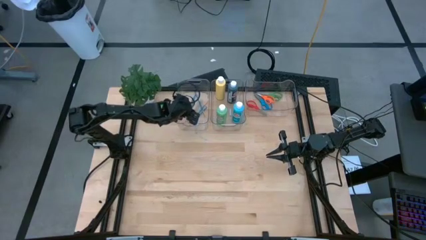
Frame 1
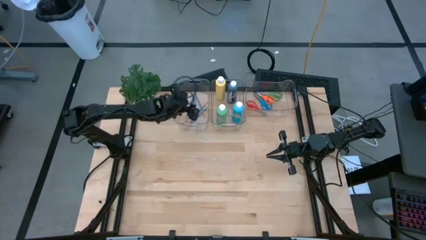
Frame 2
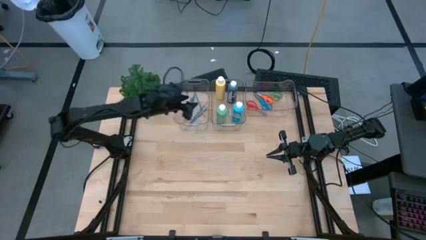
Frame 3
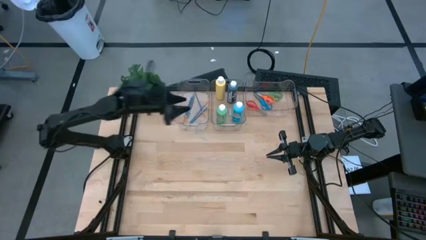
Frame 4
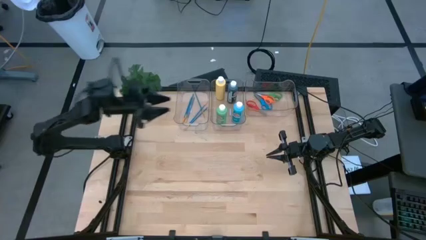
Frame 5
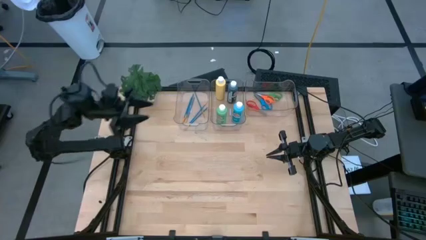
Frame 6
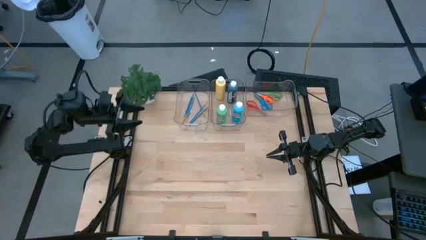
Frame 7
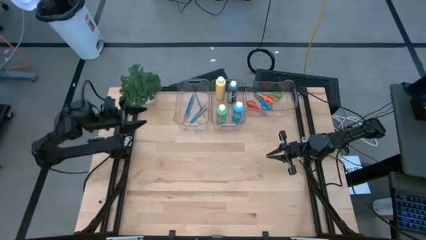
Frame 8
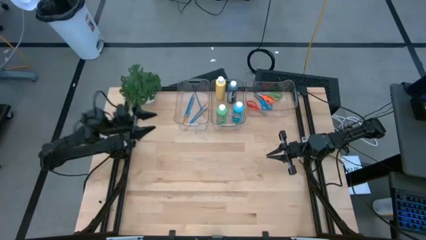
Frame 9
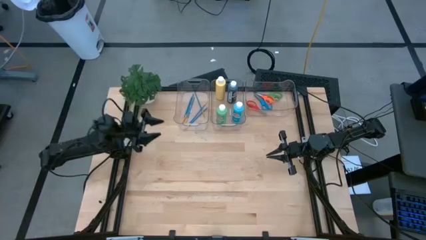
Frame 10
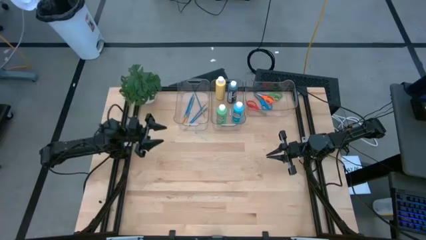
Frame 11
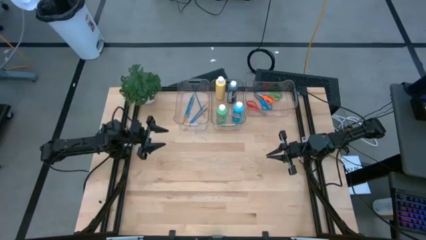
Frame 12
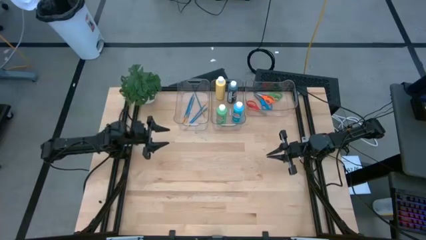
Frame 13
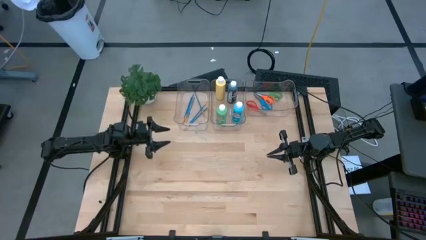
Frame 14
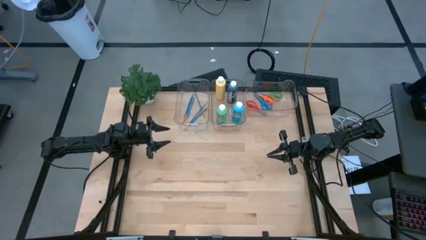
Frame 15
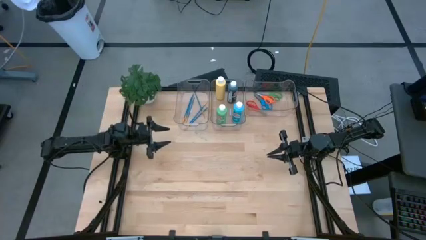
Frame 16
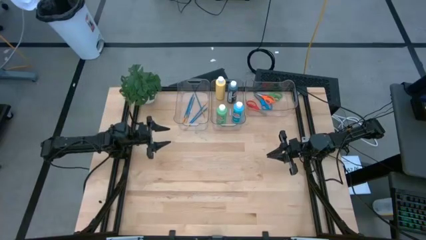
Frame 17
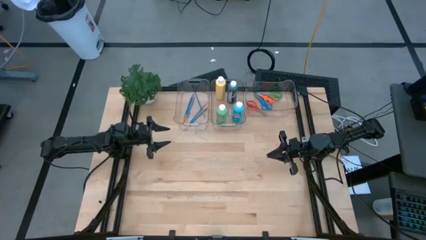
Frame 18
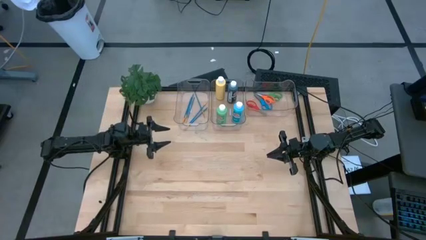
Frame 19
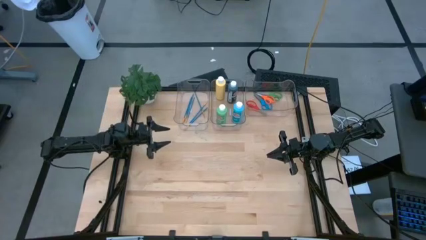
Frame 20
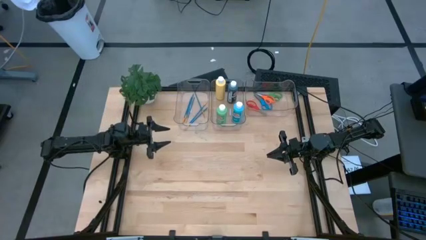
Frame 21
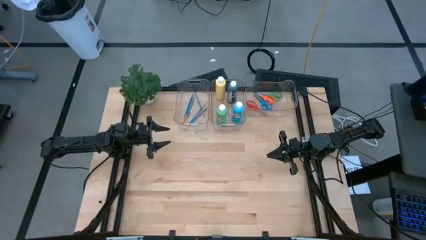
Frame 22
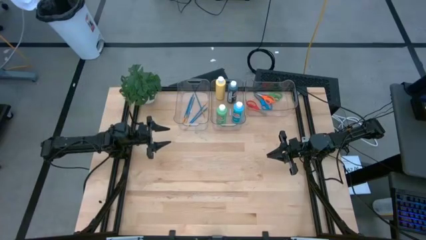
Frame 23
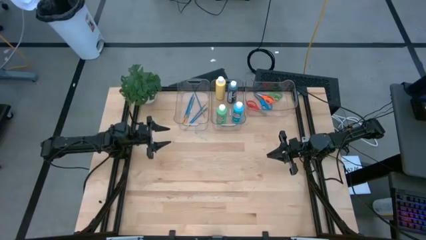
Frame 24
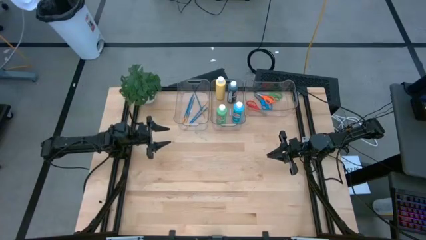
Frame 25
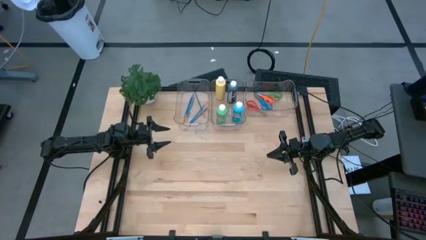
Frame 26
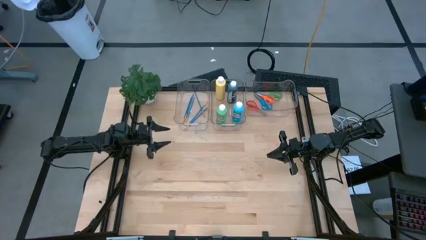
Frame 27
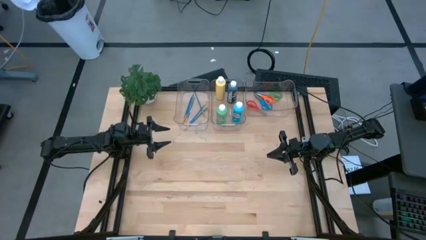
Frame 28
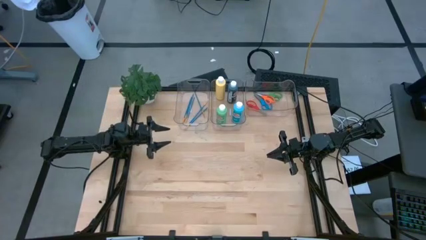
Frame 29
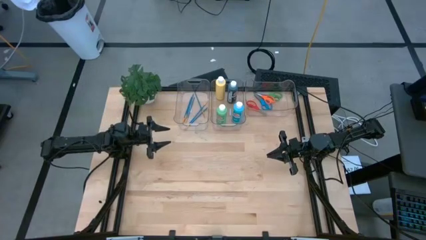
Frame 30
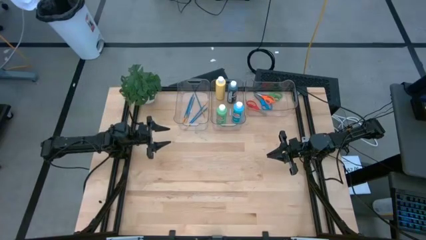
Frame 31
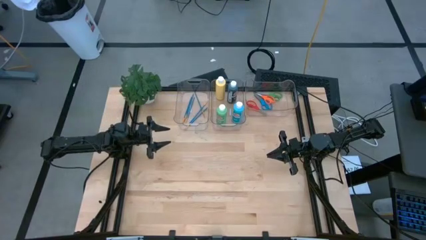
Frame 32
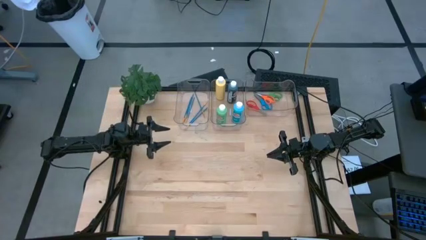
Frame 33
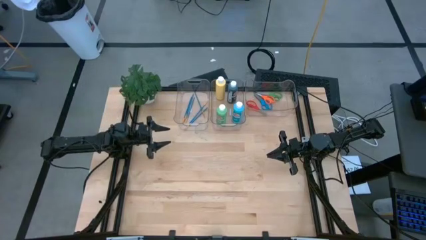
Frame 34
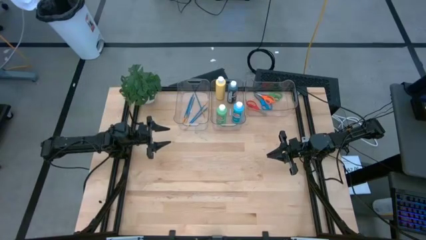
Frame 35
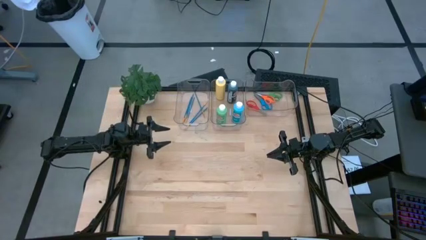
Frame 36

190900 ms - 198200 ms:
Task: Pick & Place Paint Supplies
Return to Home Position

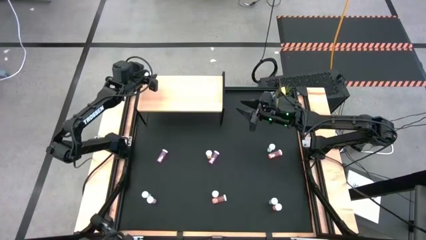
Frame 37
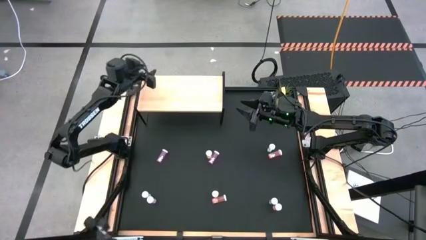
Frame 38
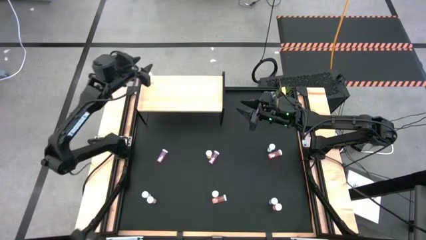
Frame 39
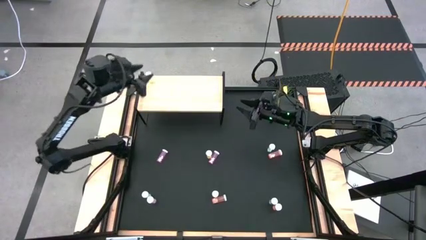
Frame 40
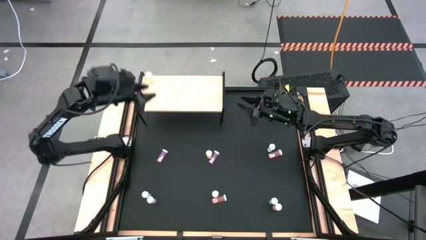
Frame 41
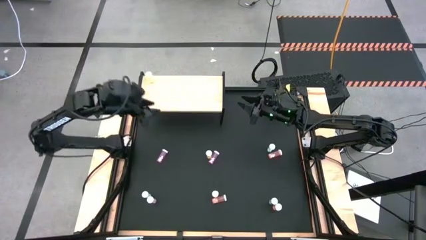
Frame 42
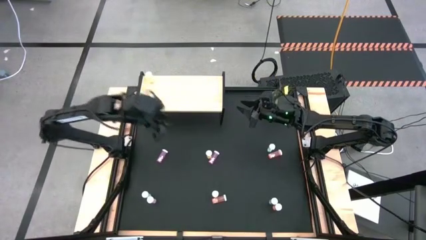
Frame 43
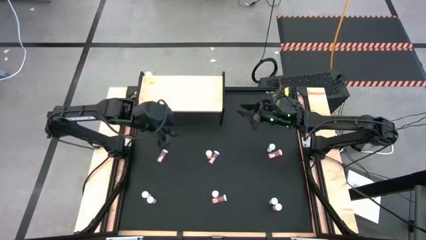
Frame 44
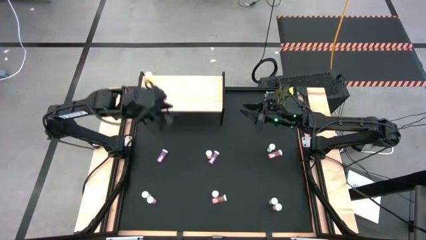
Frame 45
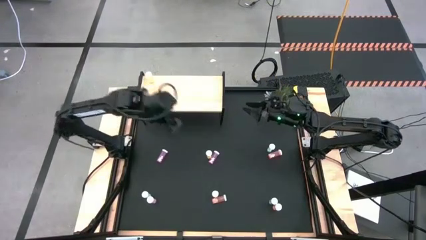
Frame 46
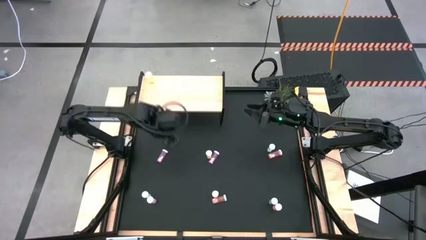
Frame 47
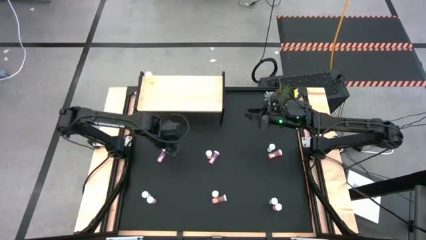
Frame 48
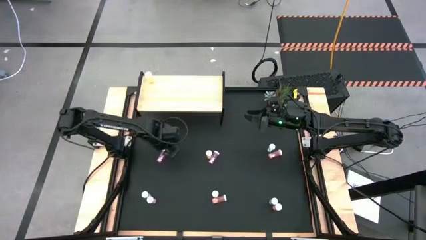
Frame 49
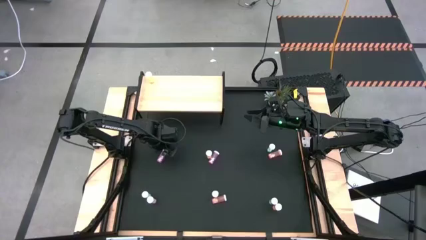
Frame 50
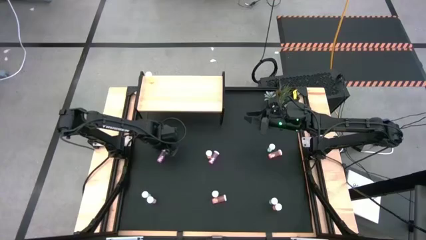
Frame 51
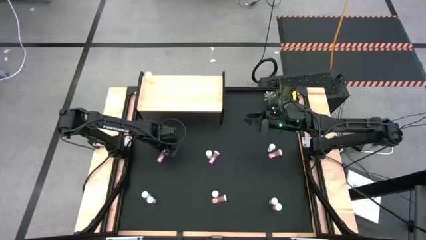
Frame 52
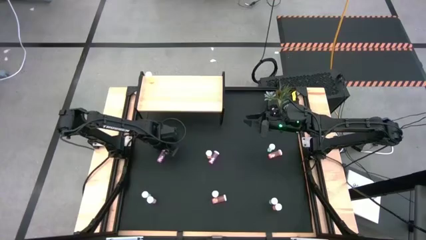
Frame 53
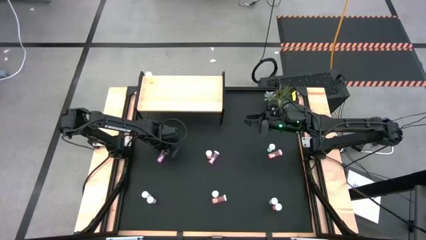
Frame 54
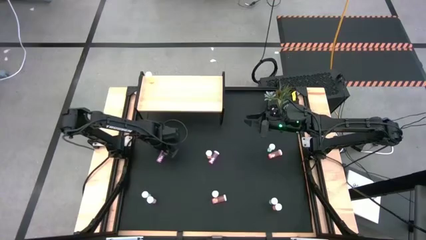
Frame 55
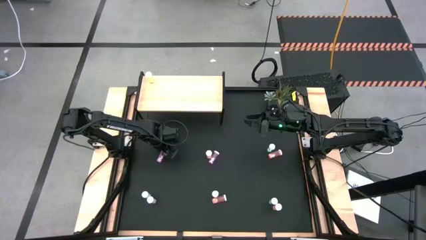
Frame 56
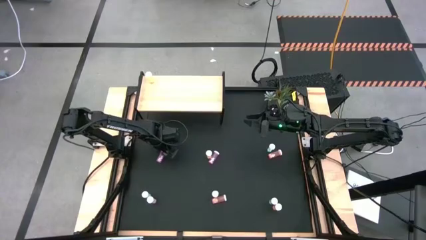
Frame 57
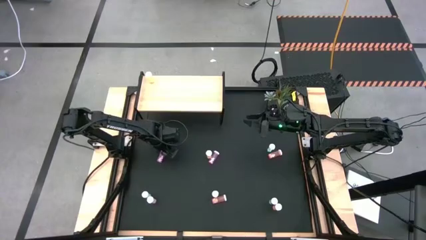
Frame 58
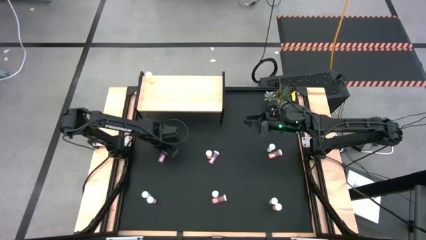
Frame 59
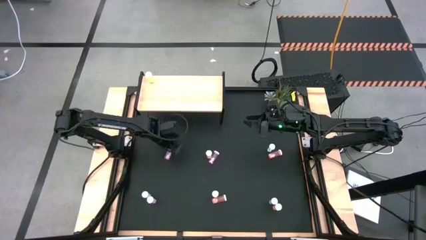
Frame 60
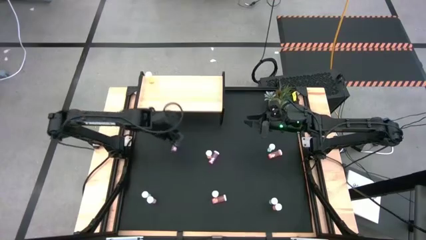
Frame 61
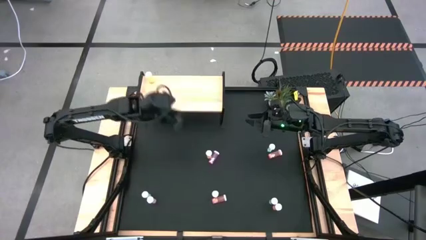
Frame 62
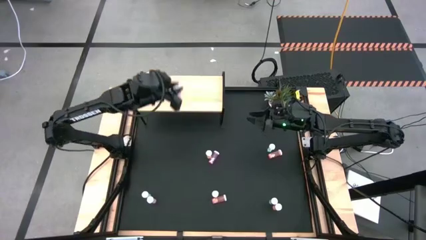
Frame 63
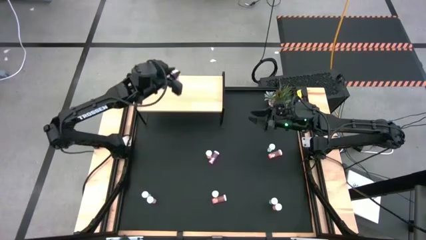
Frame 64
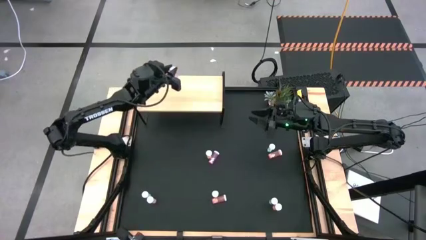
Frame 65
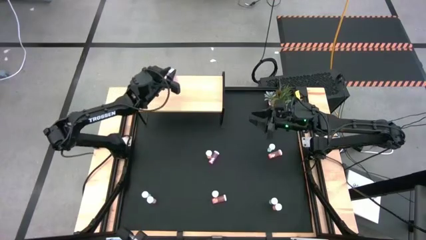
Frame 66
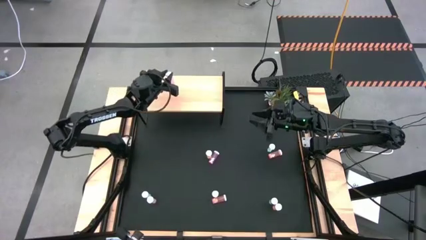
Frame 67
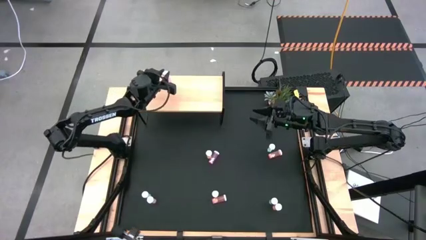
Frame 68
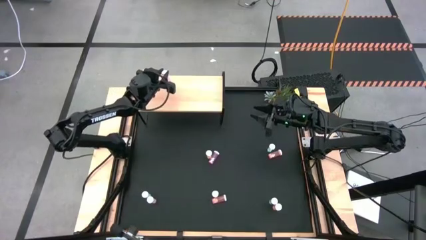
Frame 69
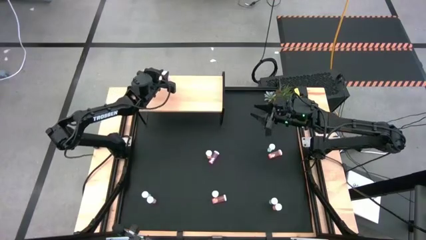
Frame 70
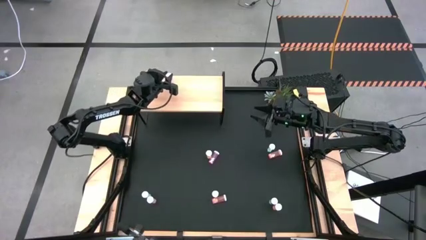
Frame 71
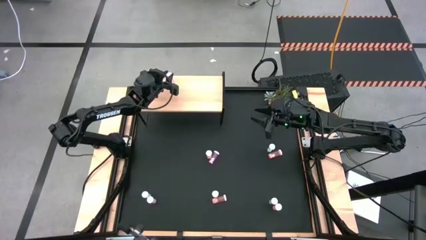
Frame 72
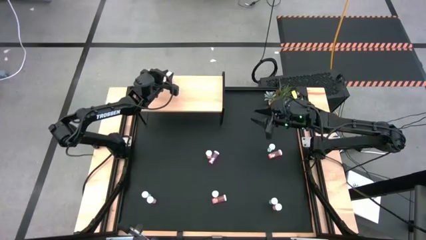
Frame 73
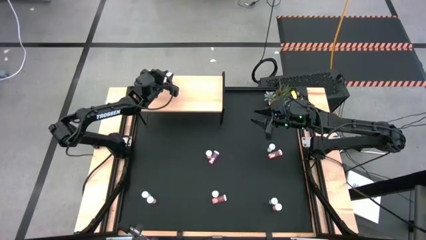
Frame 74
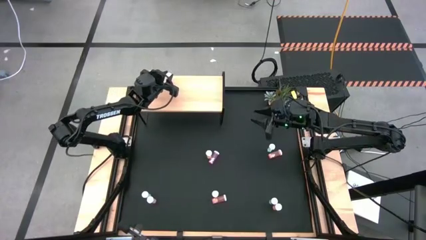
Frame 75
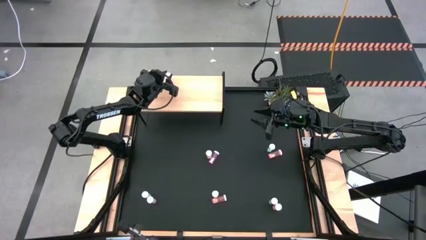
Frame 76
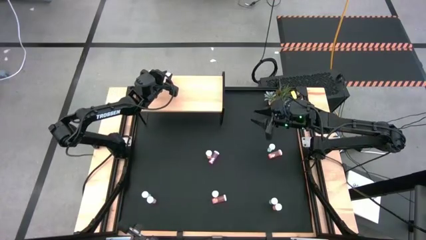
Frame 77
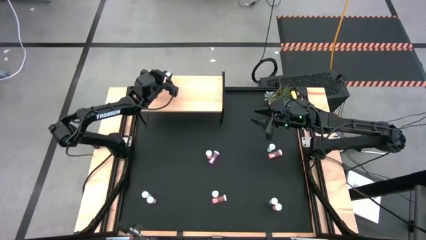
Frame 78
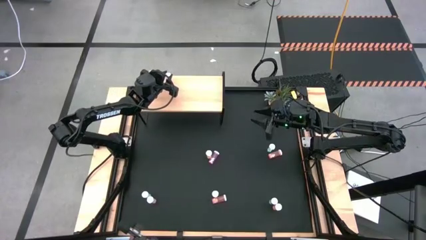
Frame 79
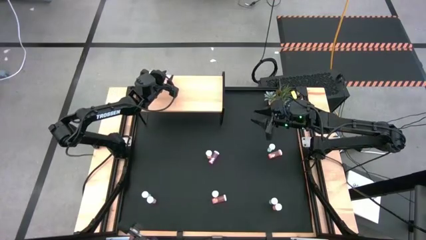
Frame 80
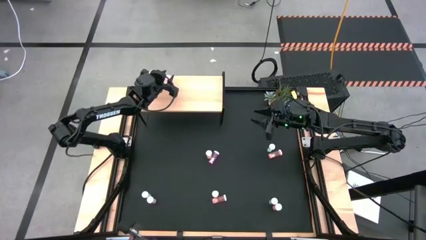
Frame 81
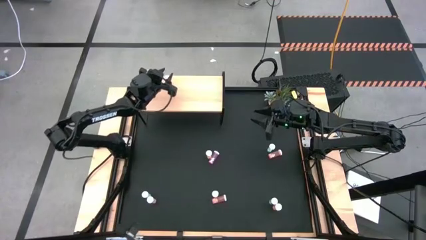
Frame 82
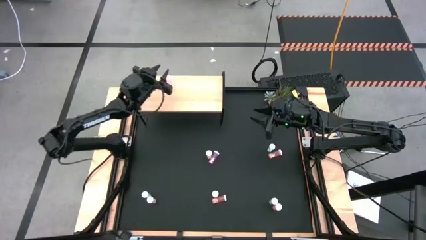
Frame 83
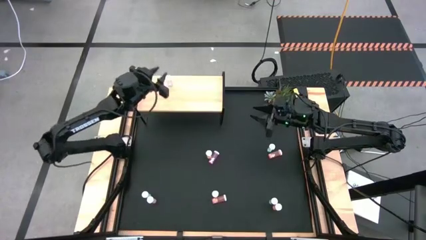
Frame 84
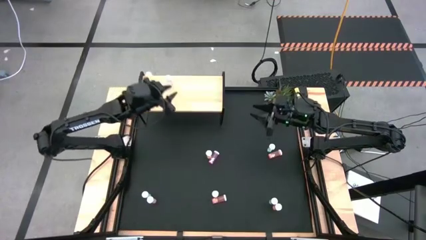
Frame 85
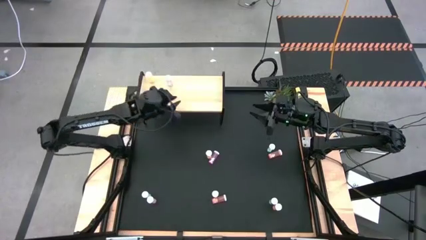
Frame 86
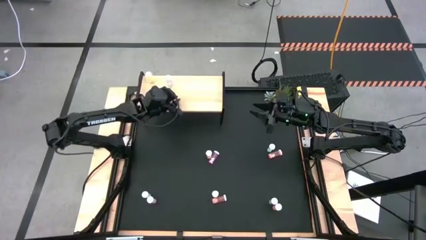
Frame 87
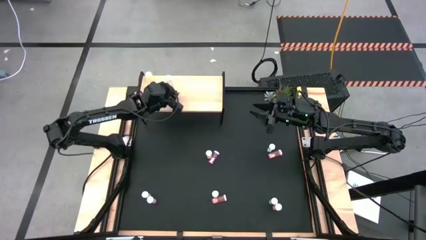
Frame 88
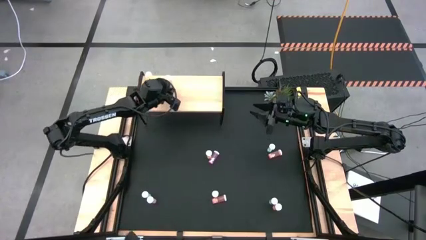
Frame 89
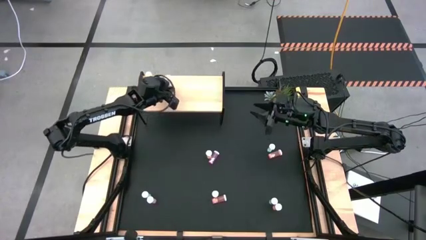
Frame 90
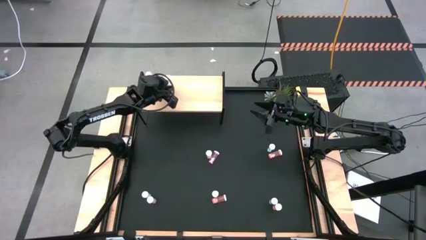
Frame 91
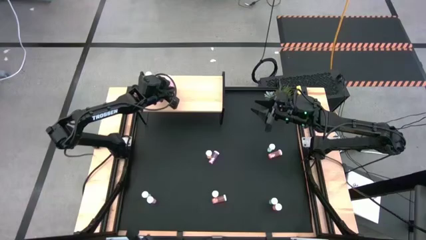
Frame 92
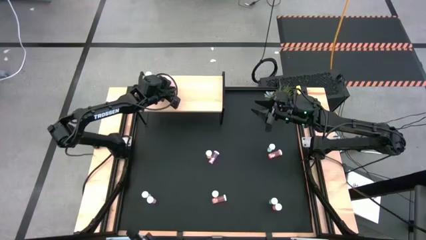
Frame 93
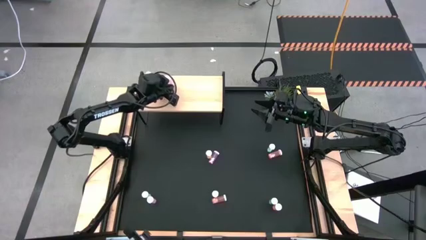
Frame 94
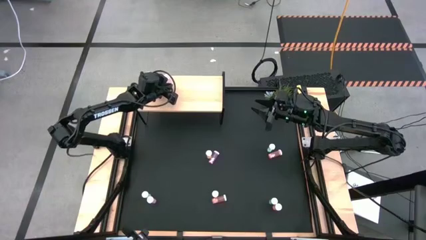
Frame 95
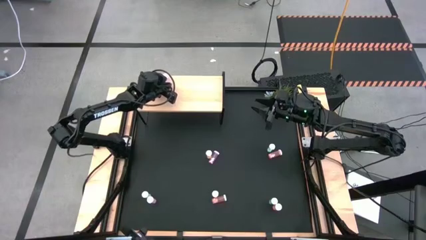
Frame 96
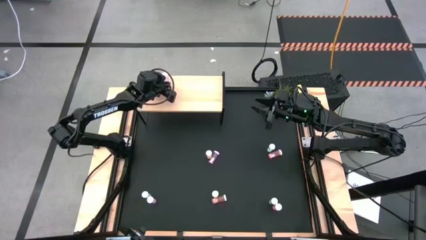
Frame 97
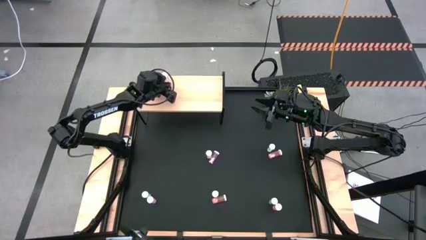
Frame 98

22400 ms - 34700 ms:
Task: Pick and place medicine bottles onto shelf by color
Put the top left pink medicine bottle on the shelf
